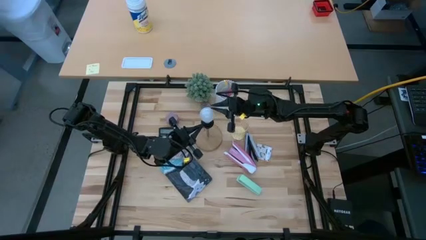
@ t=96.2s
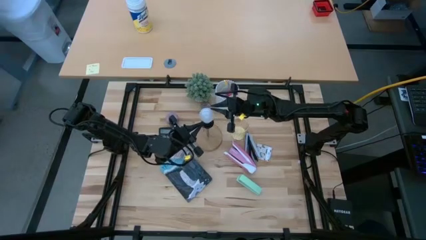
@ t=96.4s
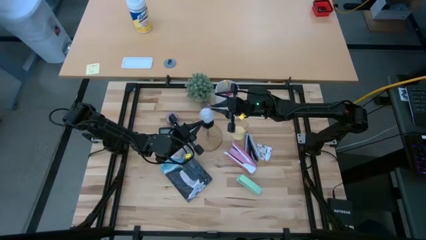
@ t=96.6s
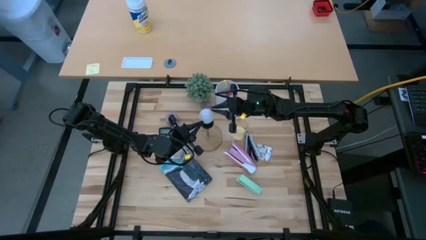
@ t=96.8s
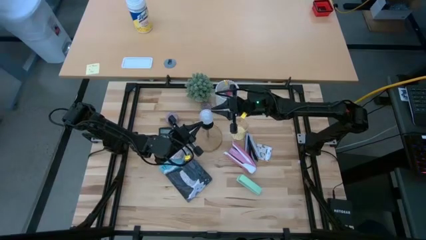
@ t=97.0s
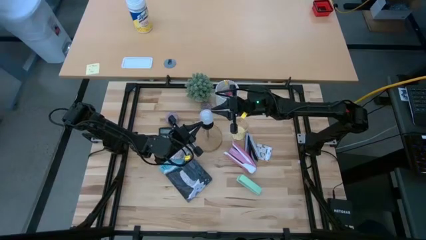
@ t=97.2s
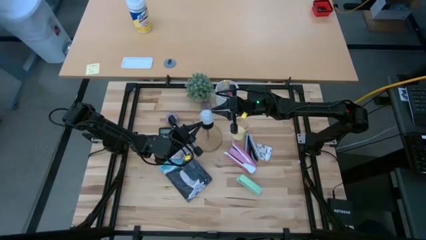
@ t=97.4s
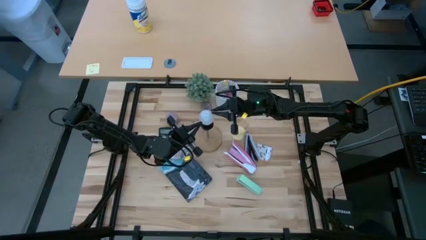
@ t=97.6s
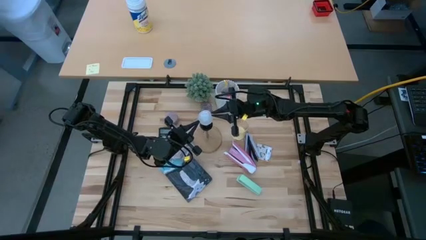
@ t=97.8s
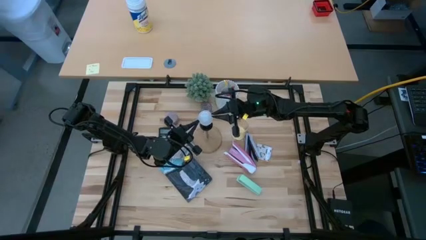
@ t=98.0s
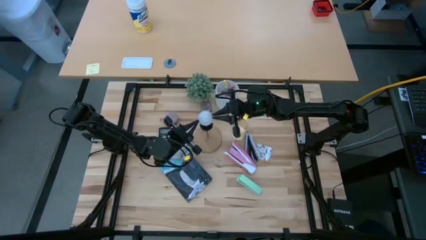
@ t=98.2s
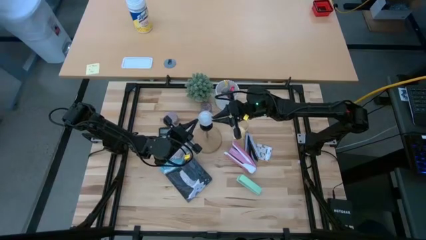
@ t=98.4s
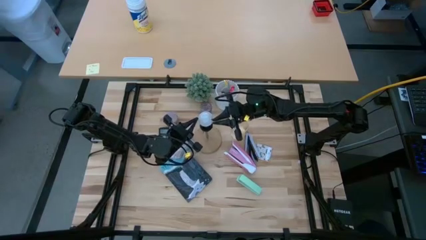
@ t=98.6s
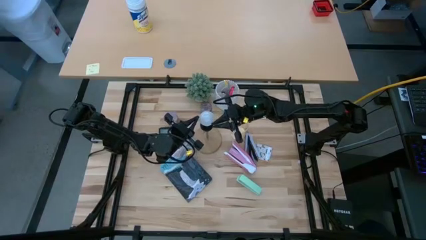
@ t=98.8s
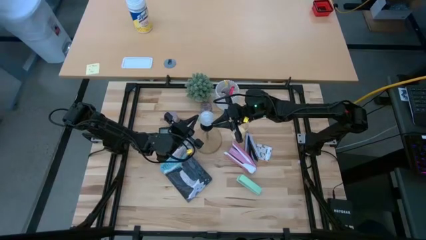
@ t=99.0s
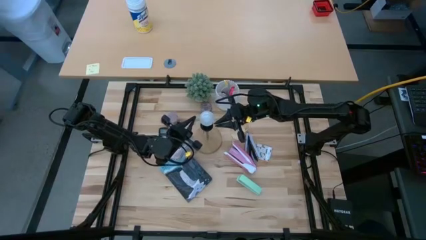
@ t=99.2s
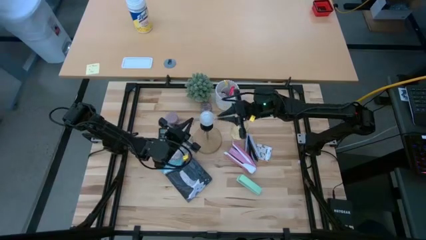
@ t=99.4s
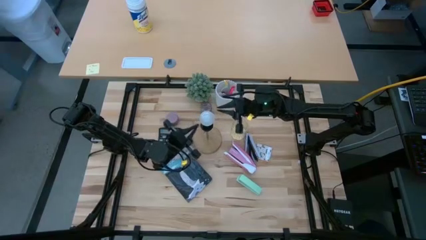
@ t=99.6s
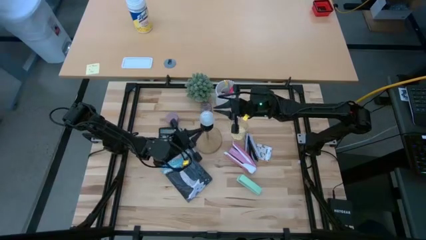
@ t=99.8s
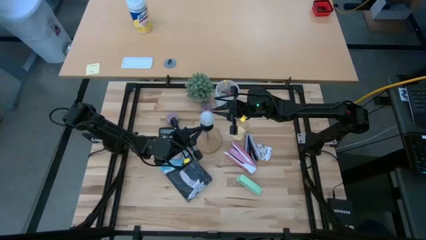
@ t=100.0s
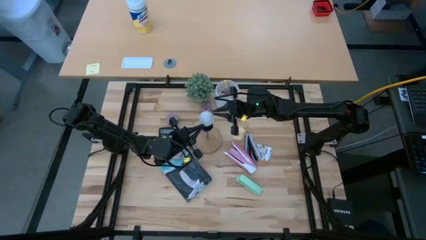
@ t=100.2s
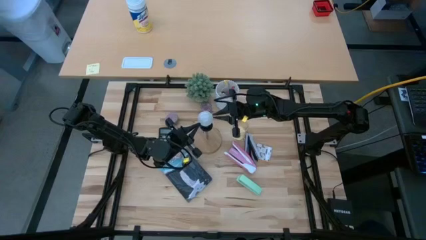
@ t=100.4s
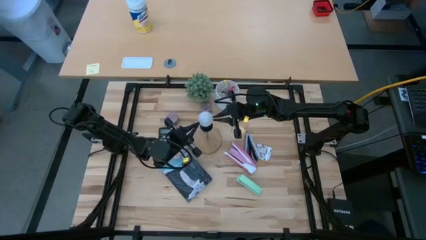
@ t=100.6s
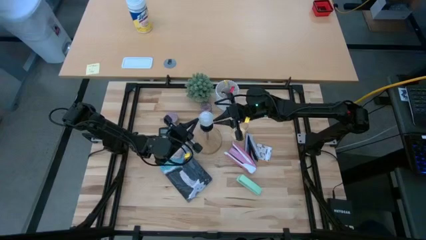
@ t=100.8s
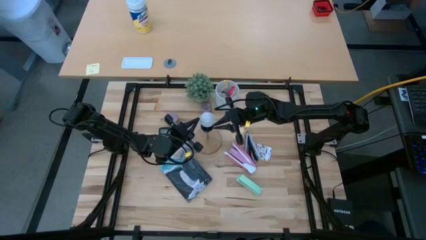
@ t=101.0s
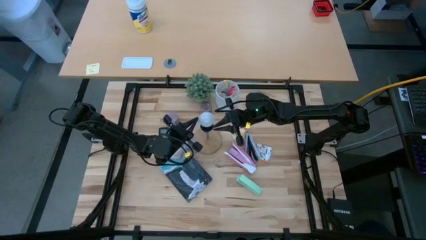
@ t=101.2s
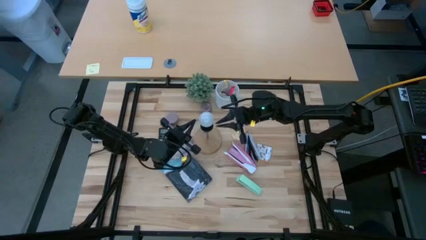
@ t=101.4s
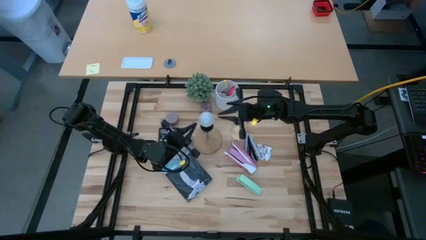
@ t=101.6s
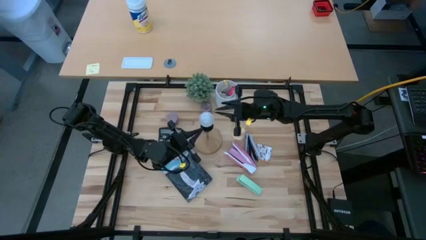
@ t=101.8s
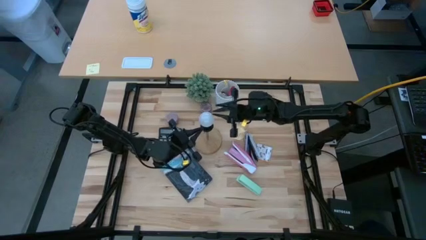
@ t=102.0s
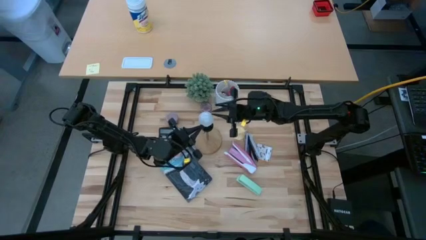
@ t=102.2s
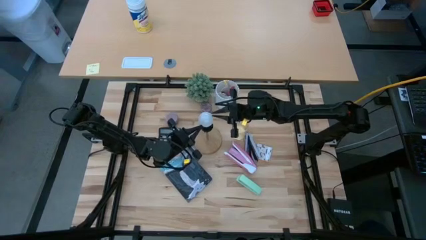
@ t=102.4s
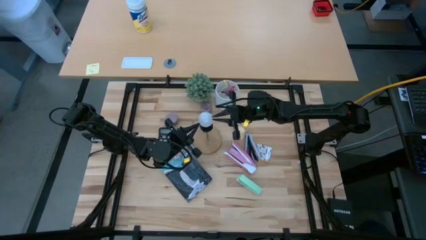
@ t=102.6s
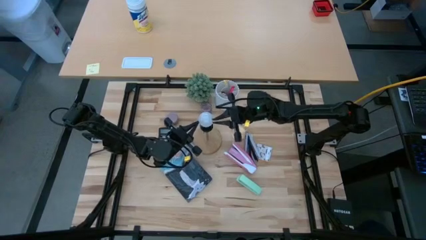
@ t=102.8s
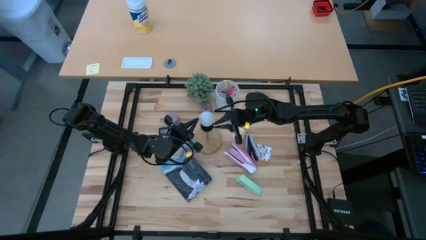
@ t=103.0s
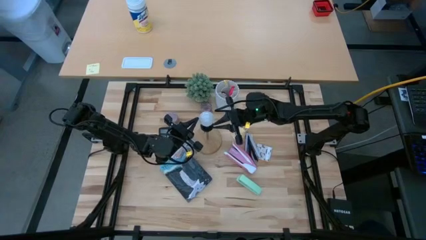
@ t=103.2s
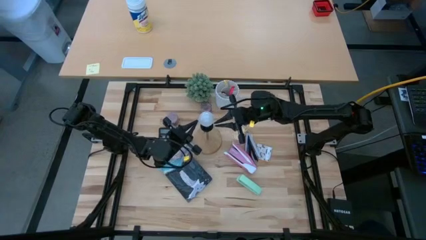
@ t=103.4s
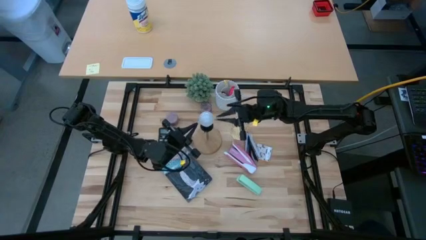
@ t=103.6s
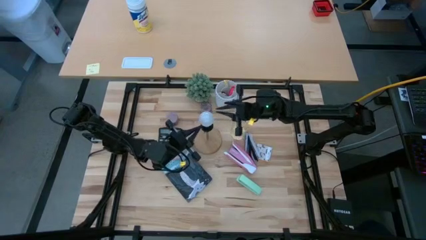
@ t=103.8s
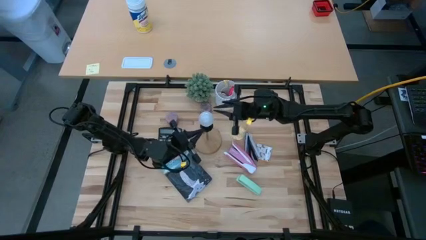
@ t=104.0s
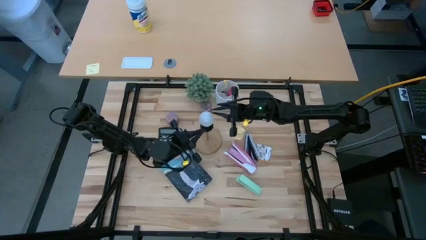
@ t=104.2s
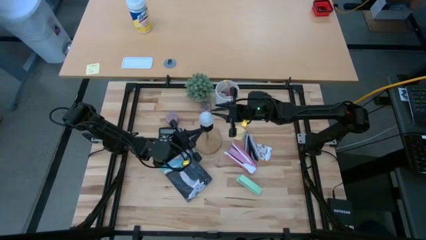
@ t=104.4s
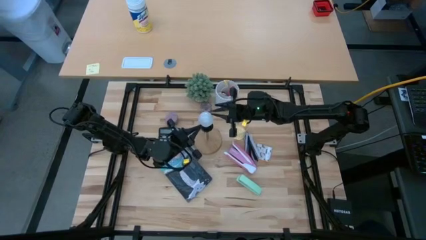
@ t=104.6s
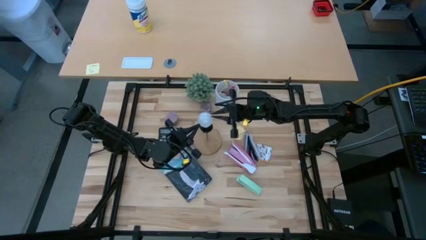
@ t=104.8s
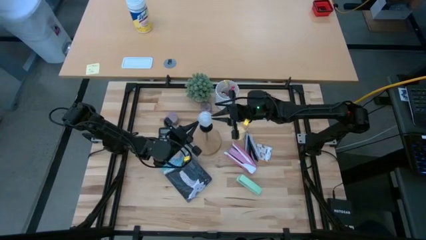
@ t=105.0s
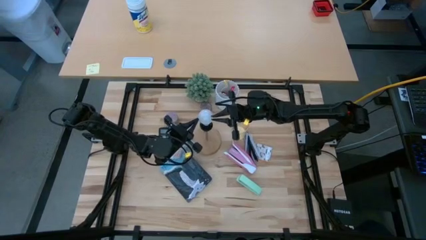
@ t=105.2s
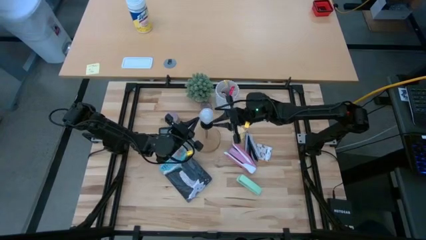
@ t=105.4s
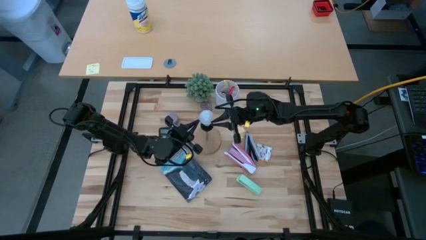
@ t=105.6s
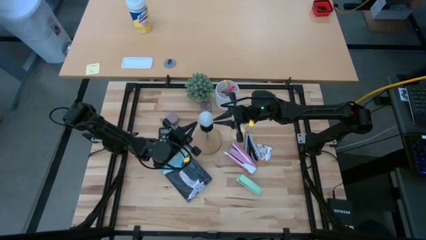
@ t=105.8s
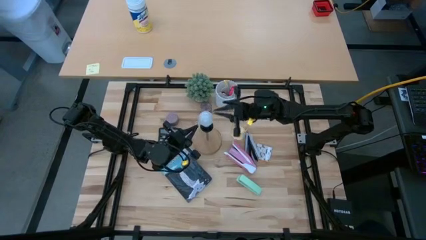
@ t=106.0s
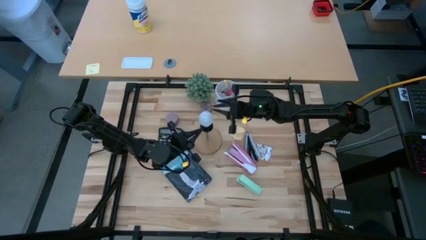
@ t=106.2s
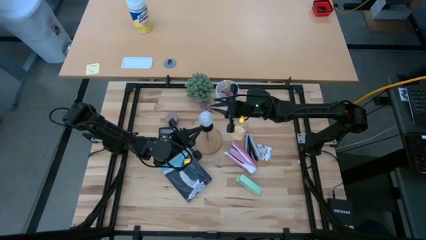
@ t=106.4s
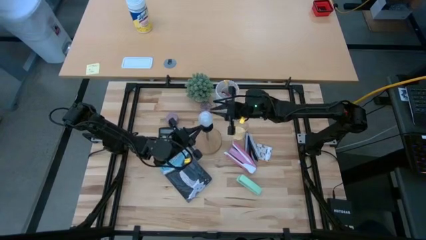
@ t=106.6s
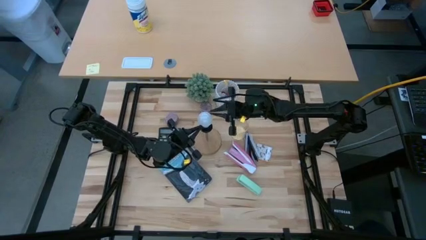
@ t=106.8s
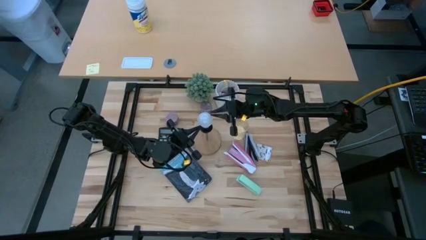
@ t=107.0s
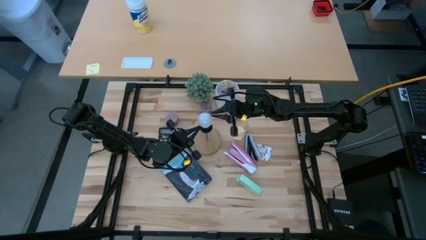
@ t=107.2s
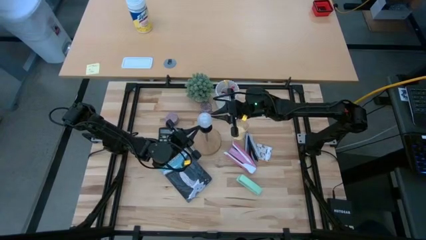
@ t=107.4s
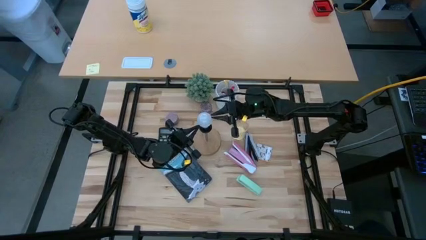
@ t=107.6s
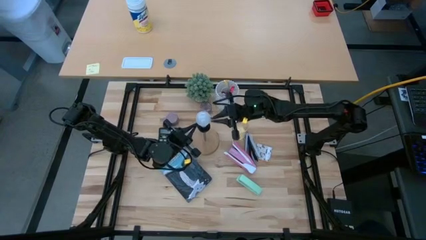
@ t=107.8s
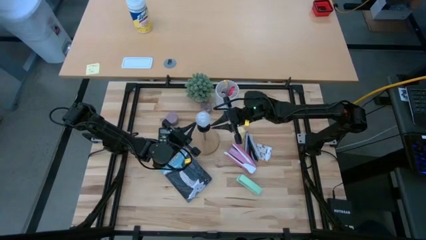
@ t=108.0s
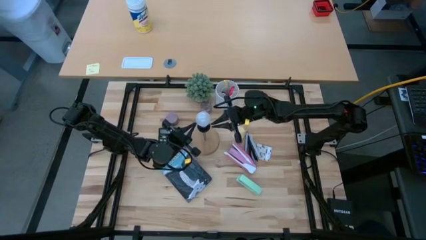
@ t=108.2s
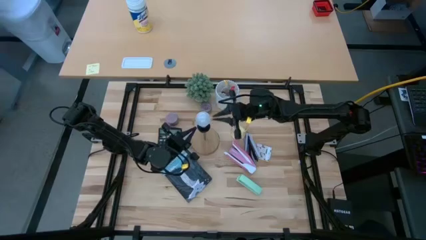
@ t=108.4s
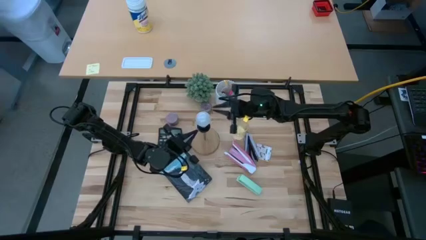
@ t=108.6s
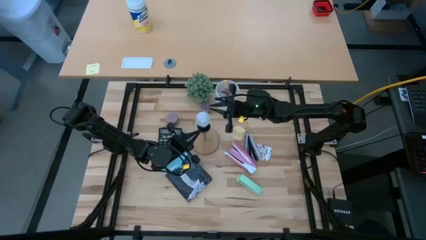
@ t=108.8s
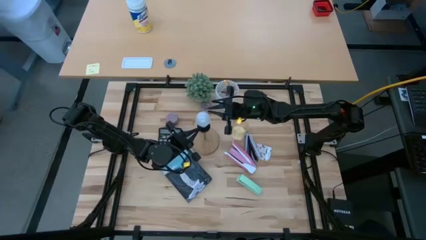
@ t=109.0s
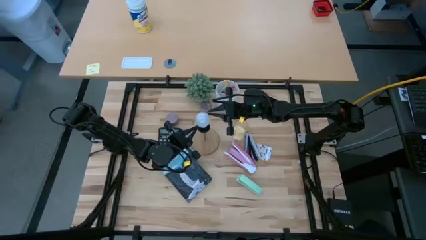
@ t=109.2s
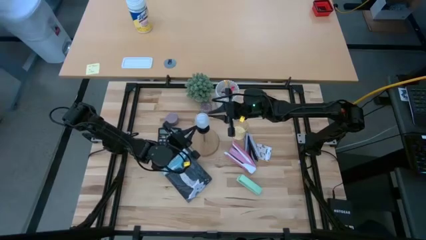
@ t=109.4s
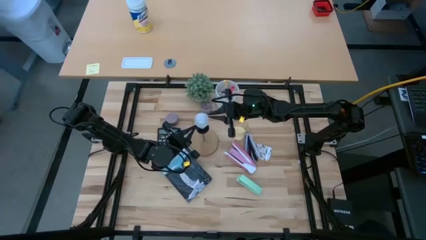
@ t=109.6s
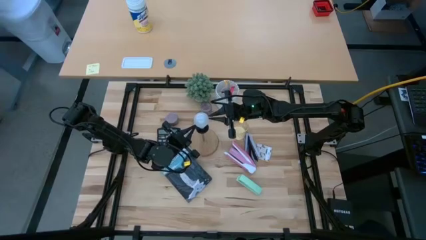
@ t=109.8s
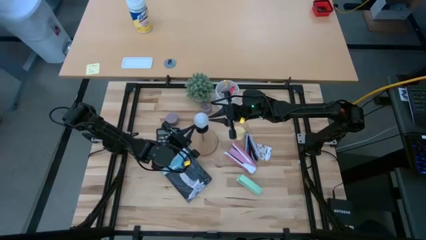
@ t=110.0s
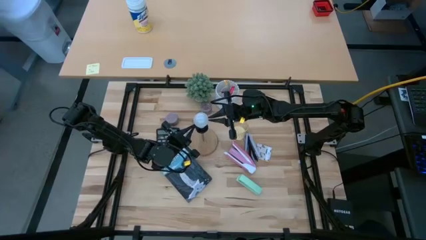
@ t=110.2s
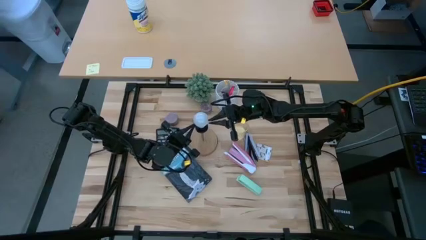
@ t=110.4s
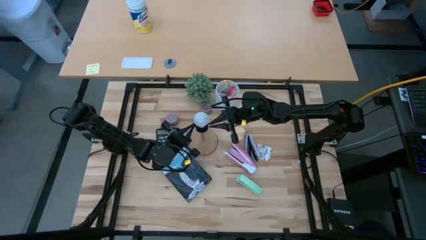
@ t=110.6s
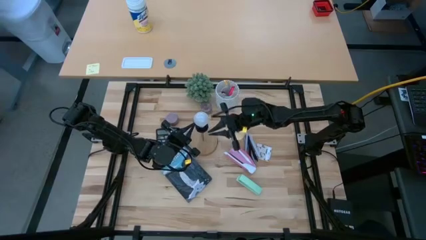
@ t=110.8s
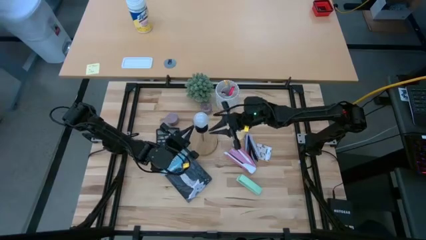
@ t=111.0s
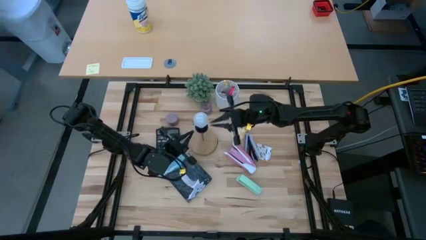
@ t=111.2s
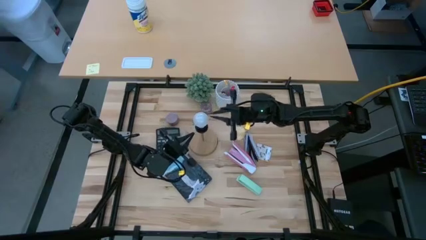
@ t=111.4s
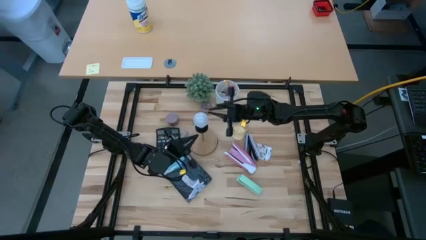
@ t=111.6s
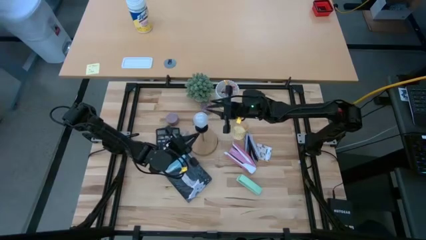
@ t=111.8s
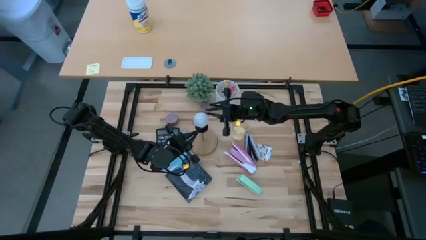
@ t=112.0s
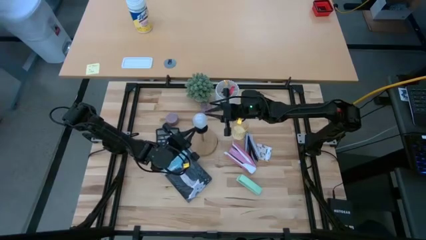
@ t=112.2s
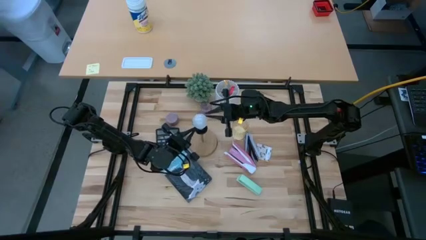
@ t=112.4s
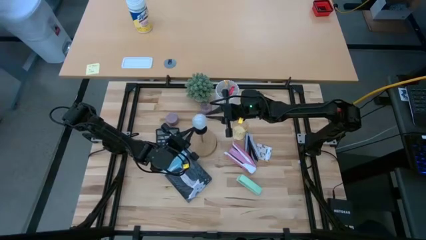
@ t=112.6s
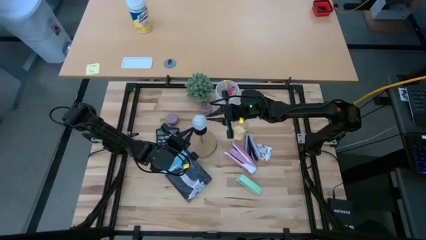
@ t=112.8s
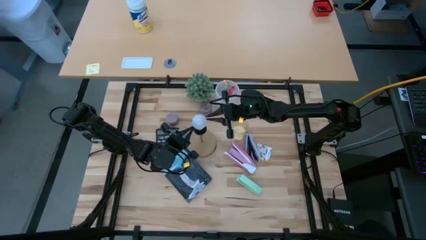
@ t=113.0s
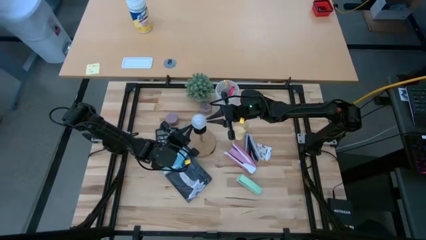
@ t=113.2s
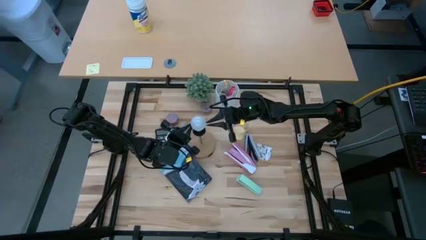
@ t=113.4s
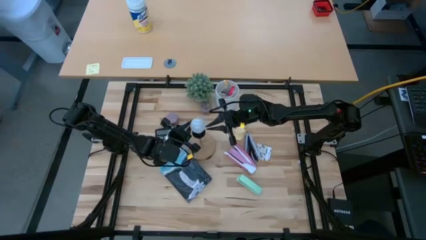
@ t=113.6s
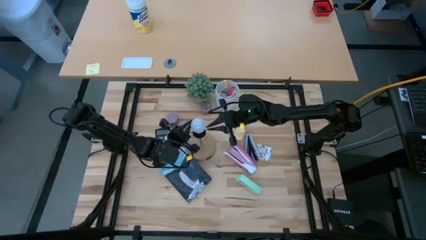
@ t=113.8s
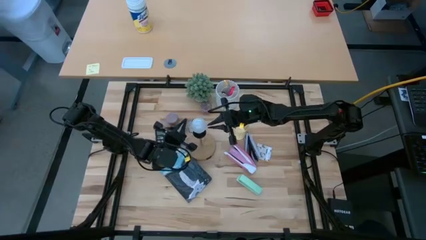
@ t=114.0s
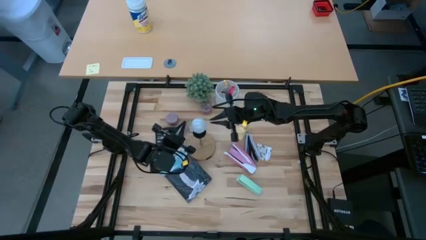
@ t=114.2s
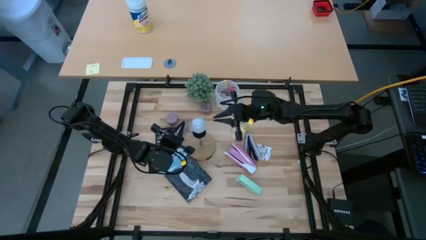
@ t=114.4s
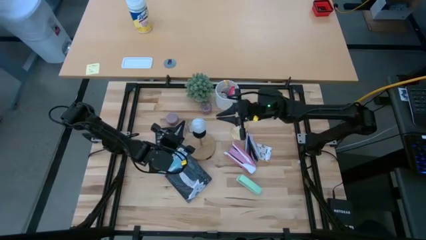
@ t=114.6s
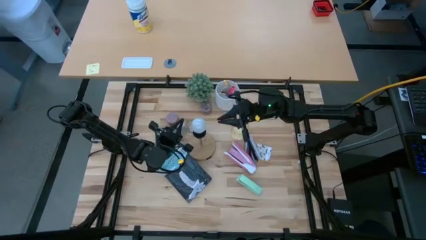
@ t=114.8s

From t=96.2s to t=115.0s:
Task: Screw lightbulb
Insert the lightbulb into the lamp
